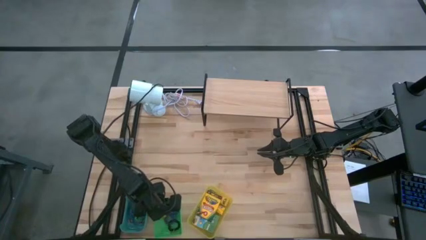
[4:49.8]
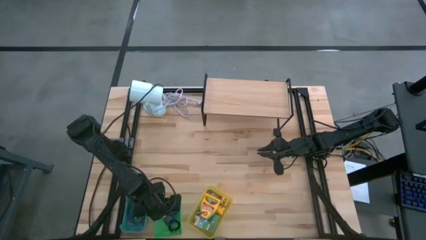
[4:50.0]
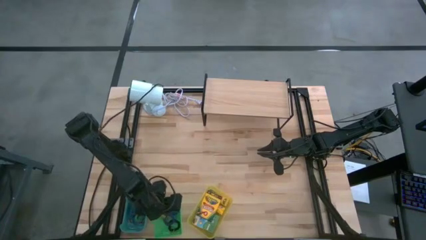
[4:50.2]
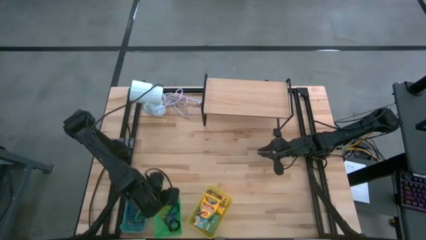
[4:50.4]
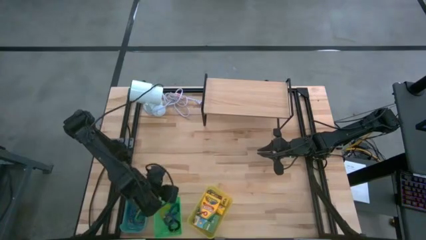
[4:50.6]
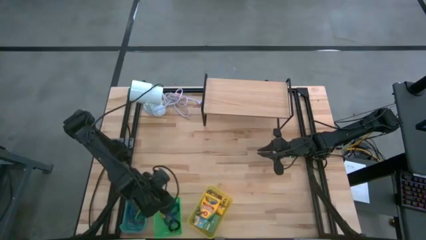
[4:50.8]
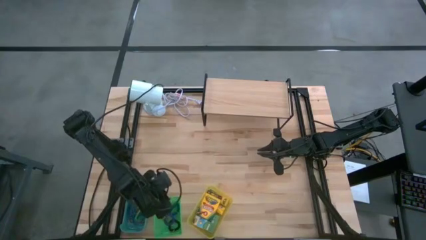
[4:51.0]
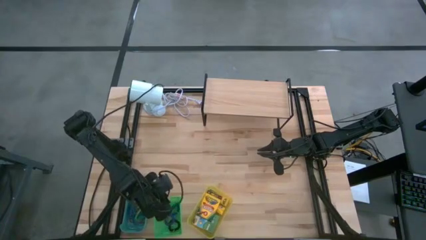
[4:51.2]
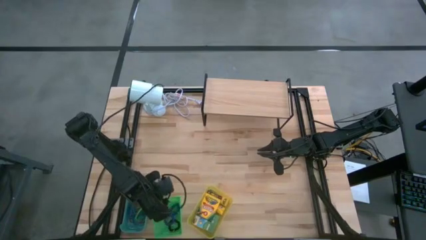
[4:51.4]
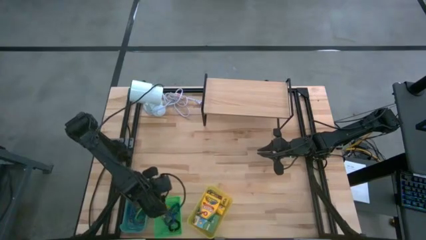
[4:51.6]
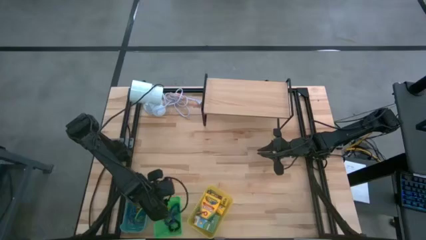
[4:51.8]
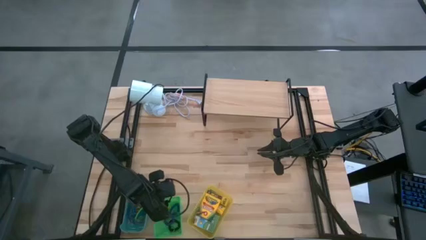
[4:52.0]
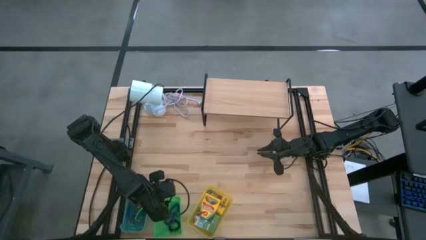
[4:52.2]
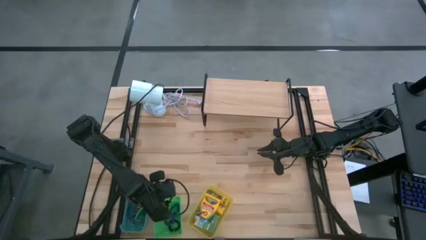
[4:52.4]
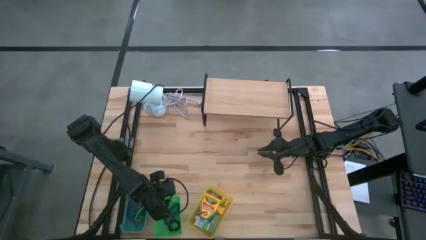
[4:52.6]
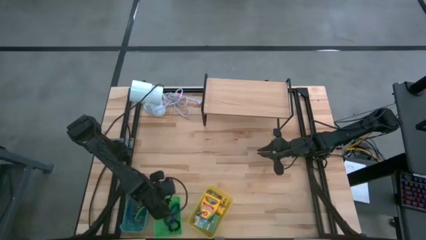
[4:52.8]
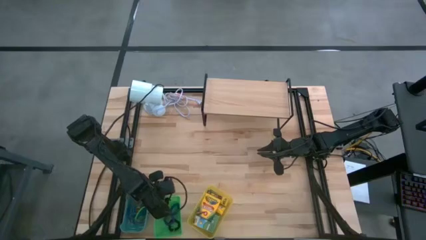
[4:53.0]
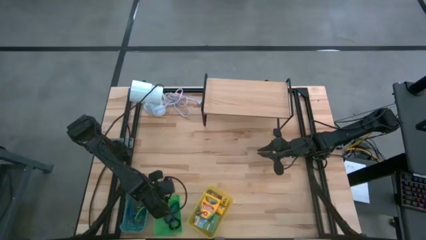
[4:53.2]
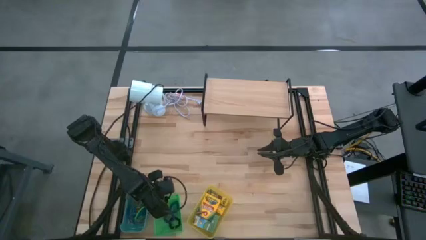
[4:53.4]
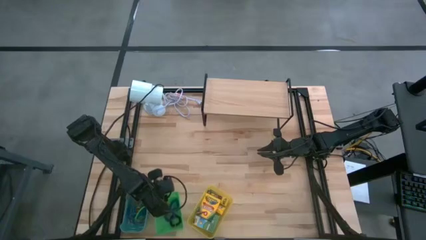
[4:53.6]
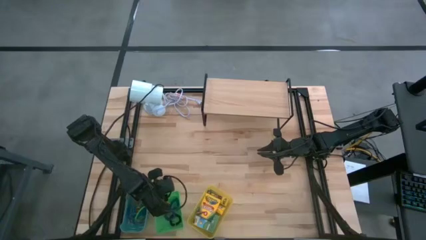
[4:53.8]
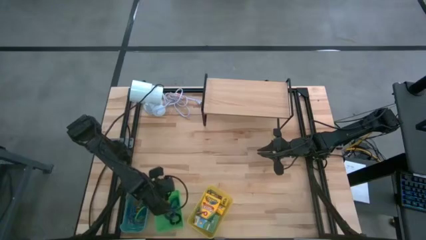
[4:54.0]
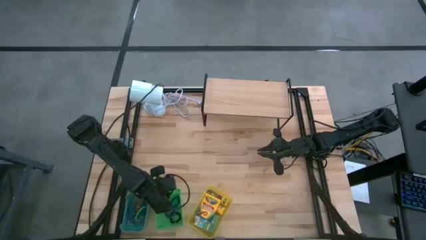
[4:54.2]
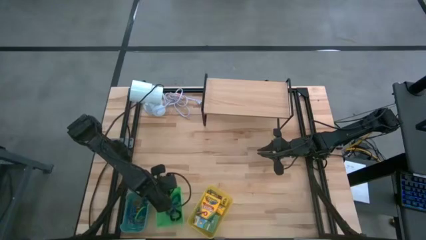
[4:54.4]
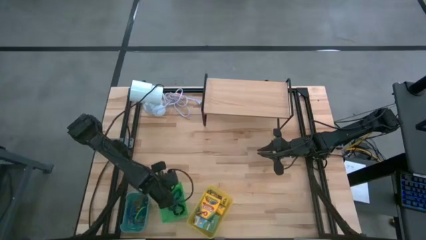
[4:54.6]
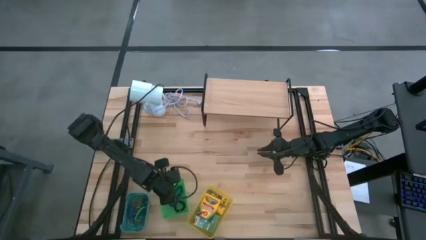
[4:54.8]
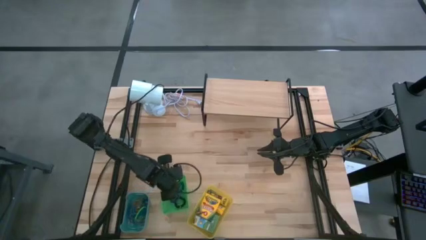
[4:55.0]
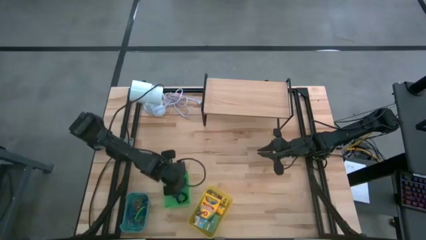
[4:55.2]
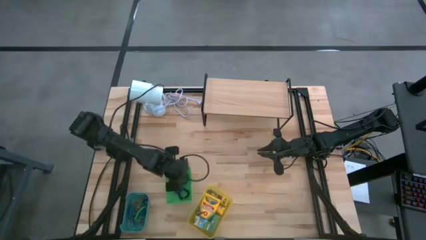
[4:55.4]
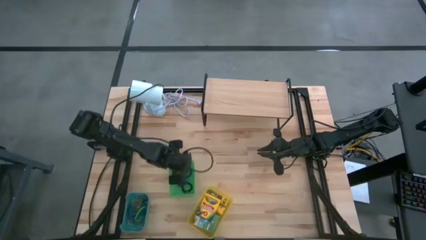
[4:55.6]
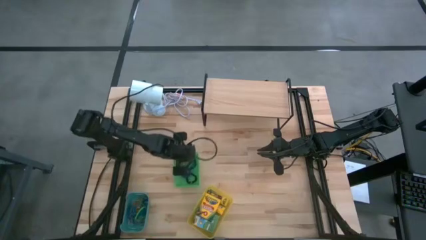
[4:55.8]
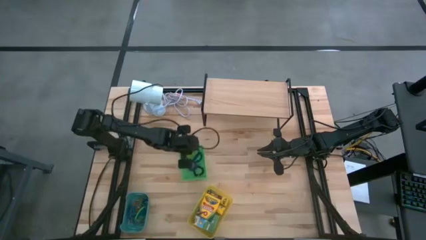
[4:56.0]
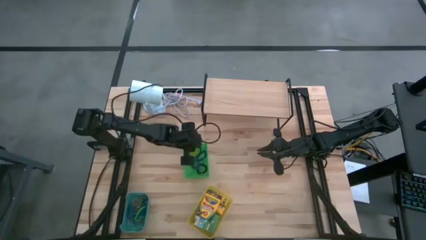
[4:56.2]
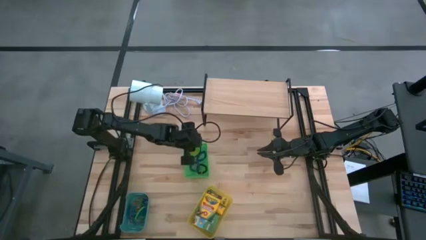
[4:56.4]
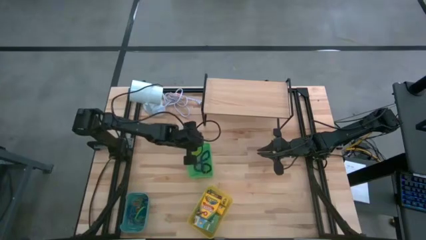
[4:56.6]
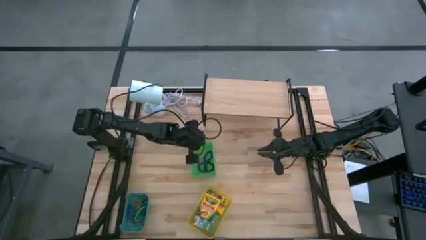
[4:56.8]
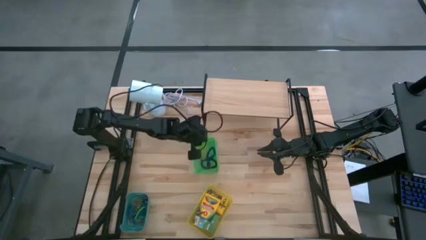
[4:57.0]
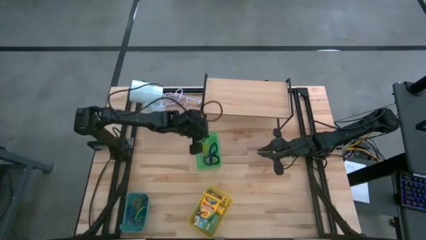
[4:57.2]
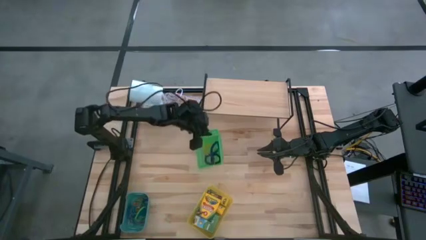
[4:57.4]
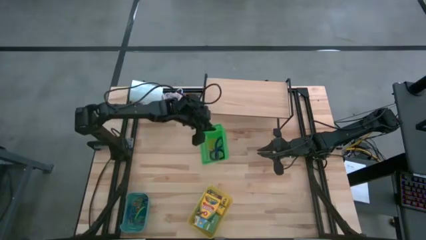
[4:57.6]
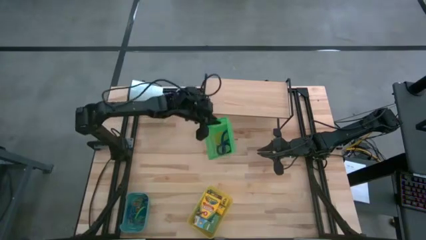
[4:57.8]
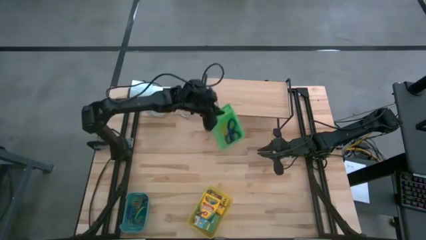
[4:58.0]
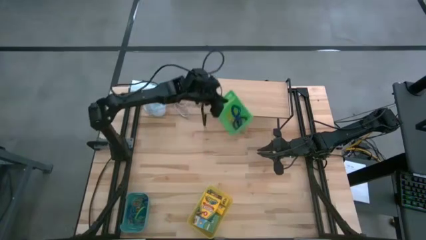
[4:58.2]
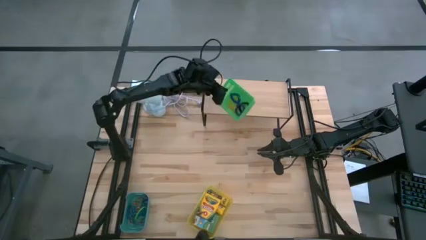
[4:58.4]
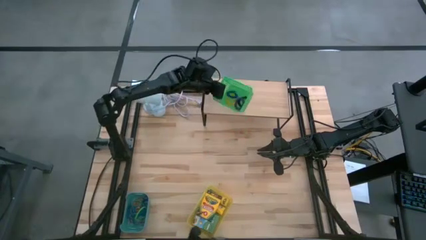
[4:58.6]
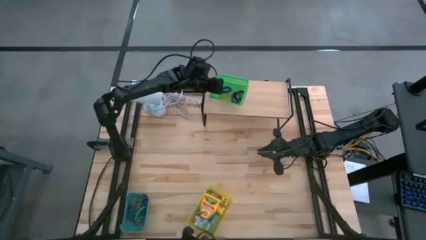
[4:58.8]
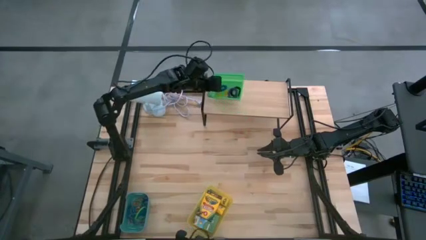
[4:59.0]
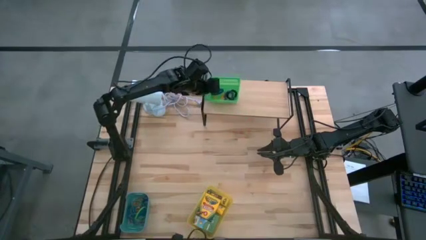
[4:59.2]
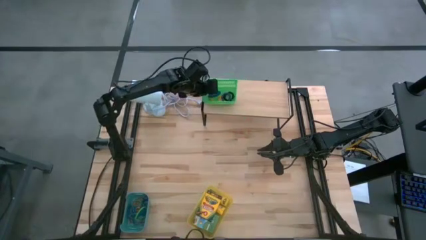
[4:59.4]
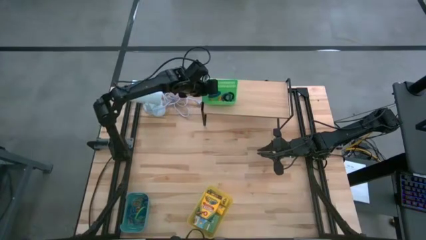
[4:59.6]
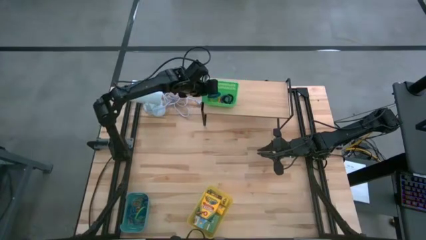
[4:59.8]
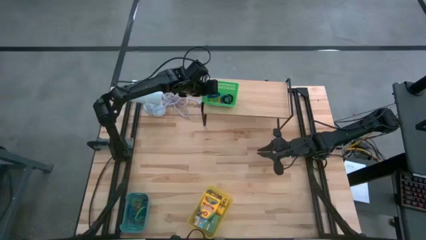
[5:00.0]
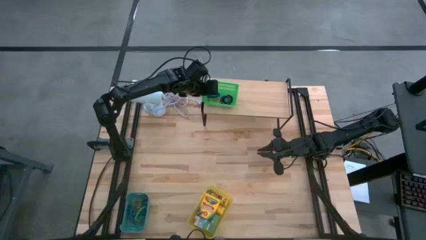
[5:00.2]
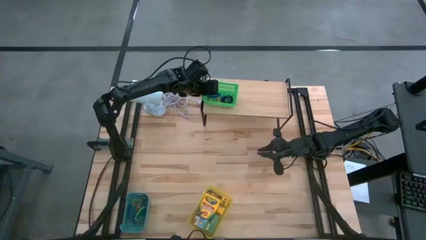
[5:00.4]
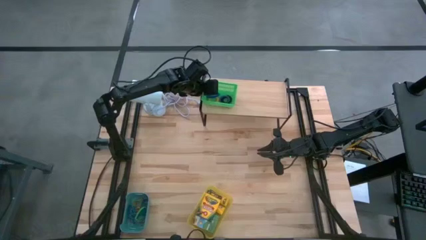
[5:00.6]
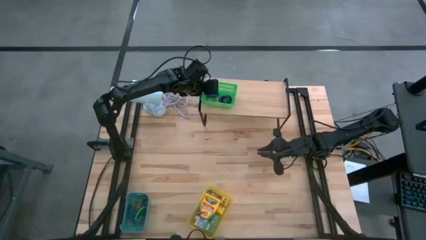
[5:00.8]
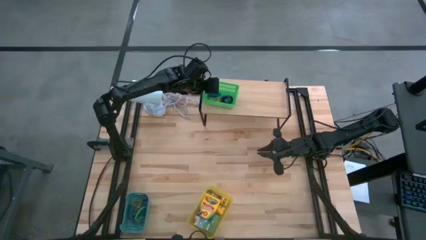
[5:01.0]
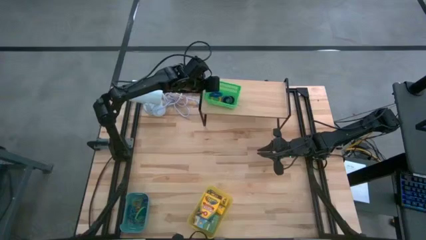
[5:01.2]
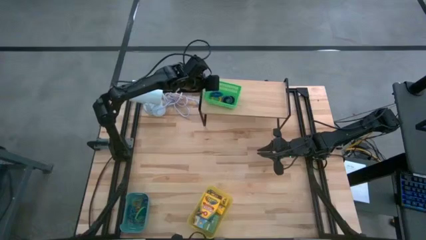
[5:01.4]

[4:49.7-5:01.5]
Task: Pick & Place Office Desk Supplies
Put the green bin on the shelf
